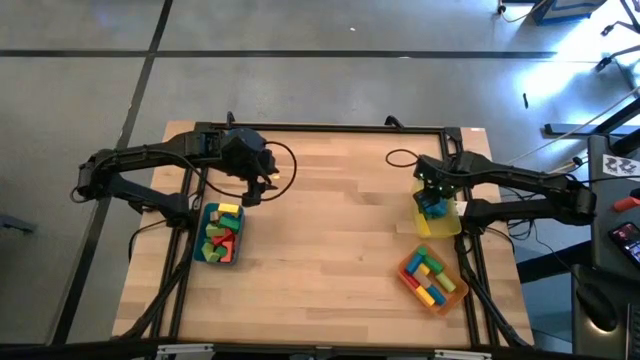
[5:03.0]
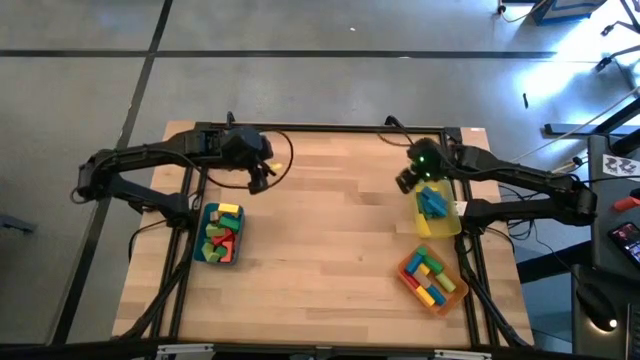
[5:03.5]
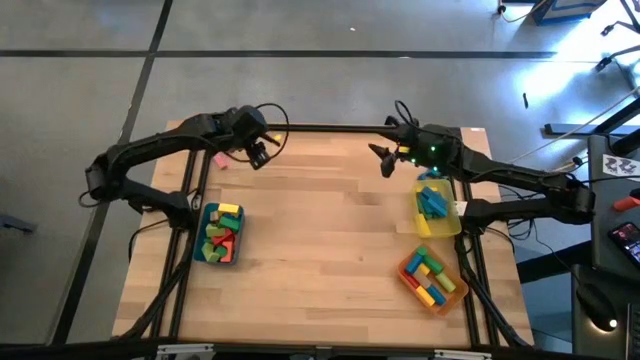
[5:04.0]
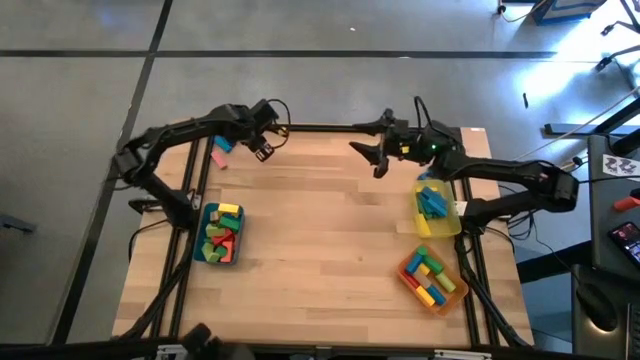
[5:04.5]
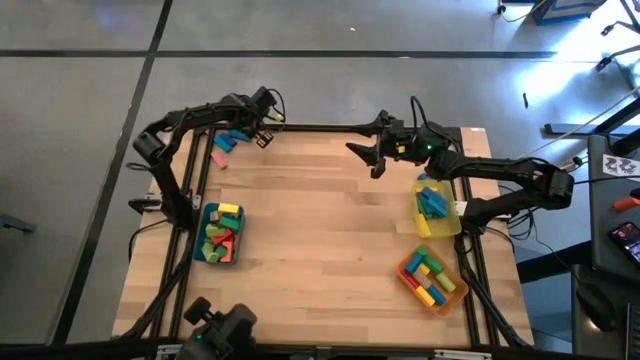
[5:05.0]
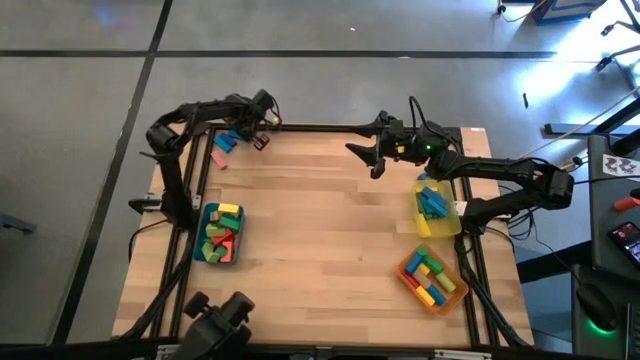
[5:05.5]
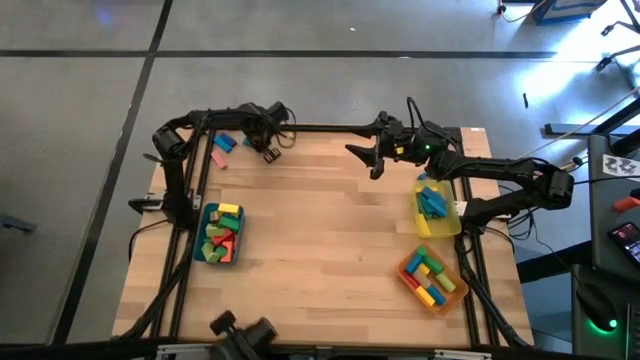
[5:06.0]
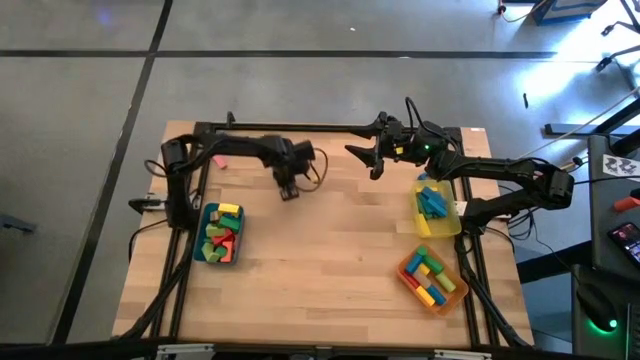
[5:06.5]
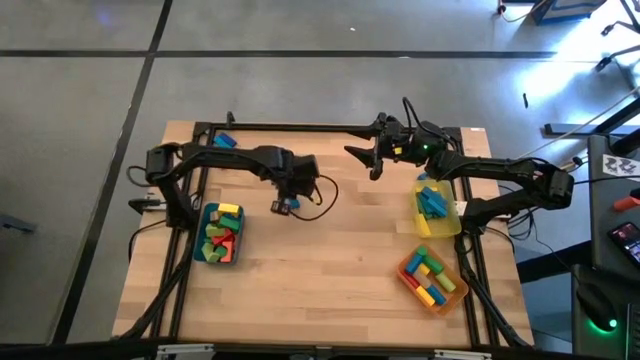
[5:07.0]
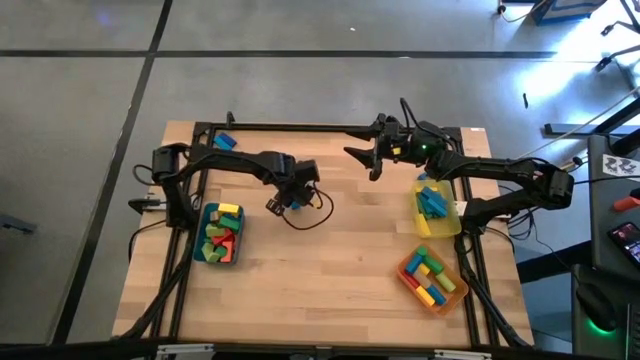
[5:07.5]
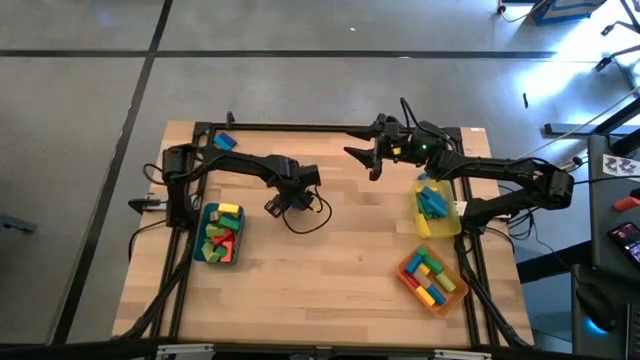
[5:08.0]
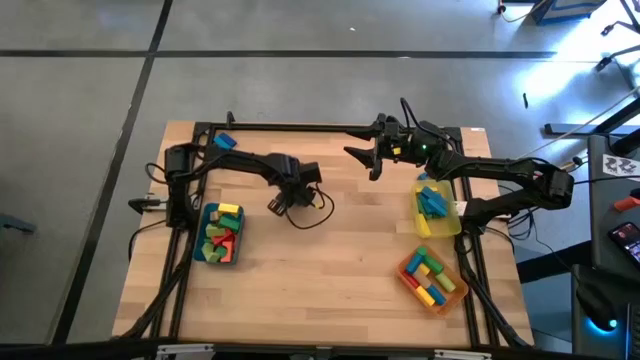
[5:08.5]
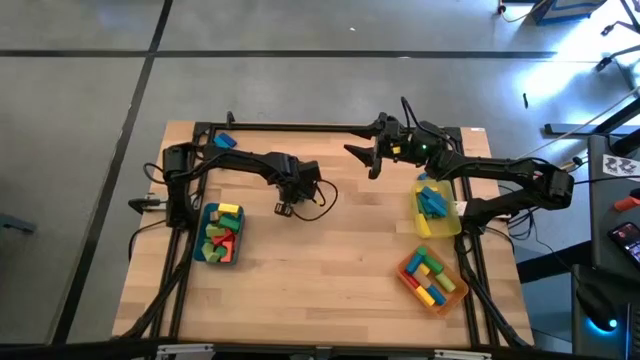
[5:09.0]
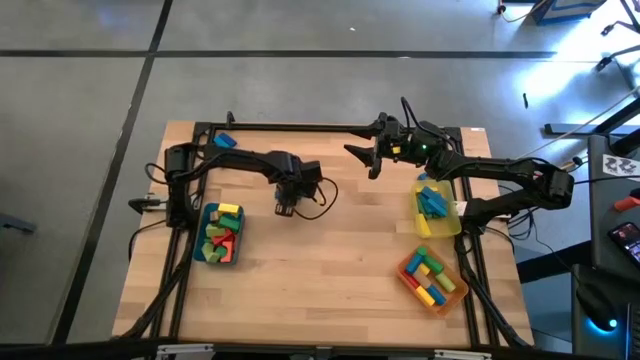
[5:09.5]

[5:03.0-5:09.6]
Task: Sort blocks by size
Put the blue rectangular block into the yellow bin

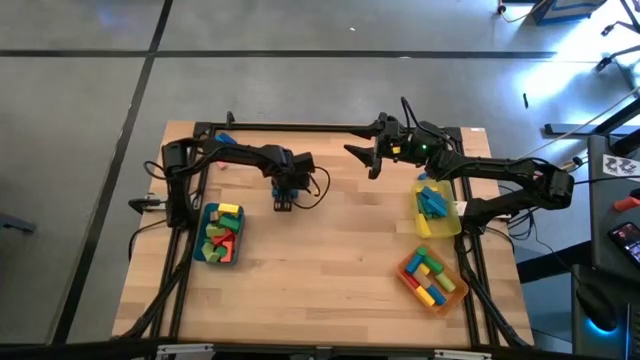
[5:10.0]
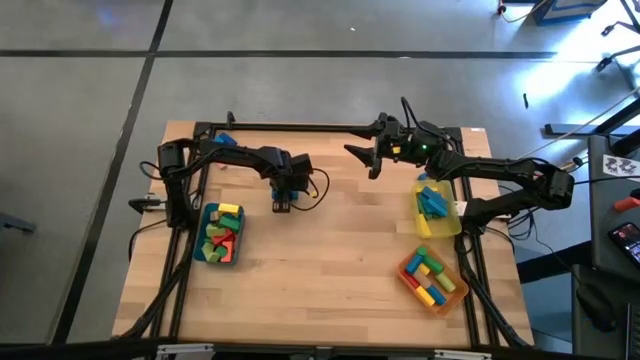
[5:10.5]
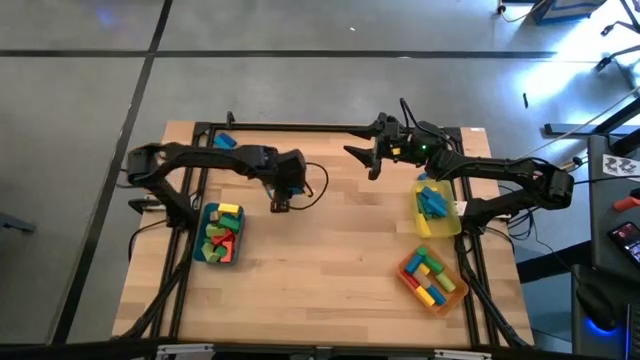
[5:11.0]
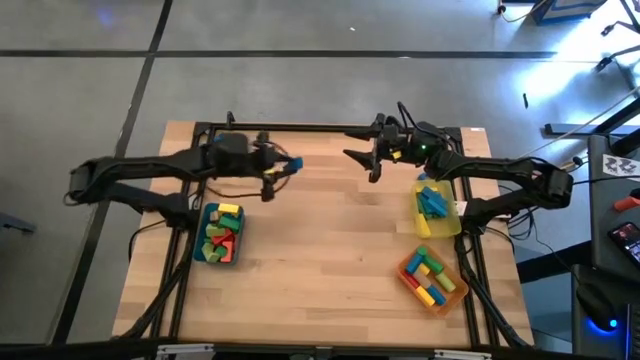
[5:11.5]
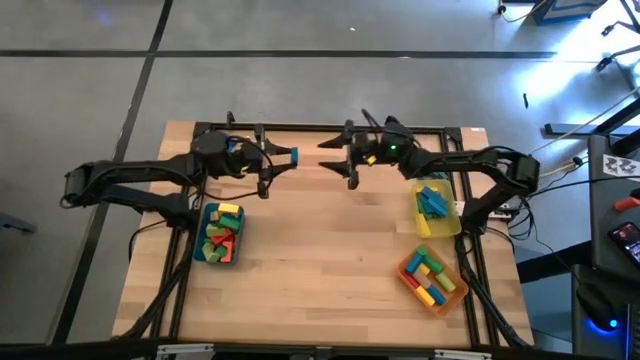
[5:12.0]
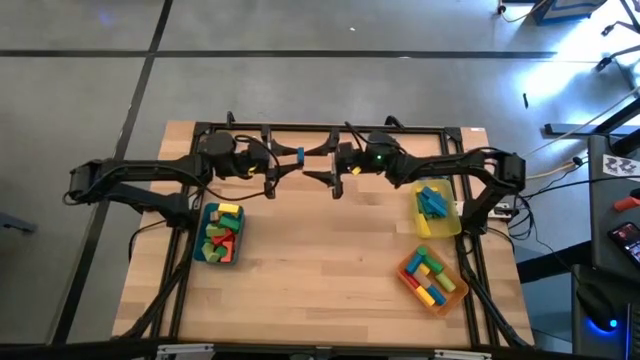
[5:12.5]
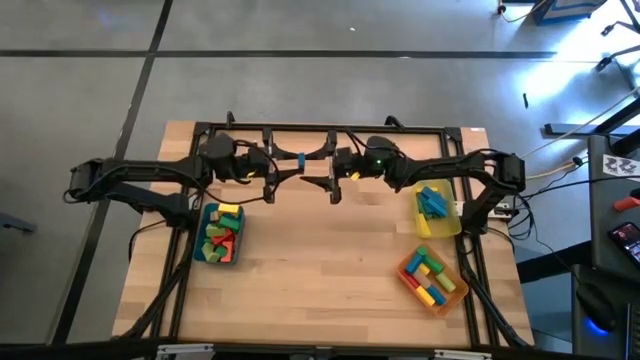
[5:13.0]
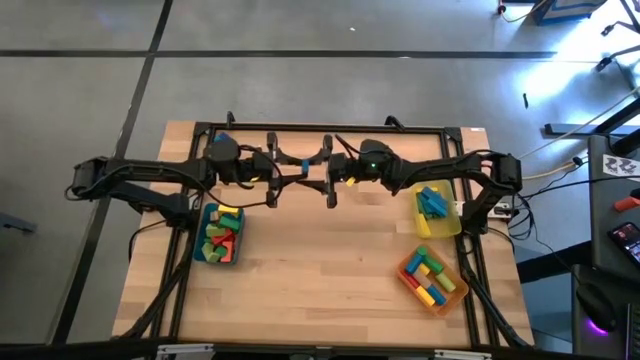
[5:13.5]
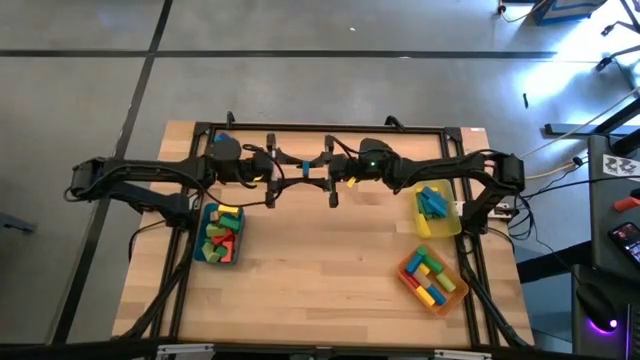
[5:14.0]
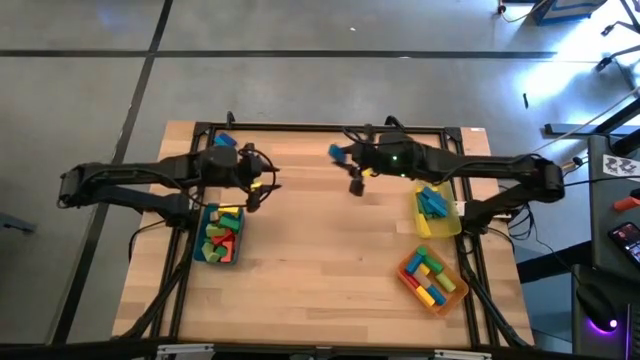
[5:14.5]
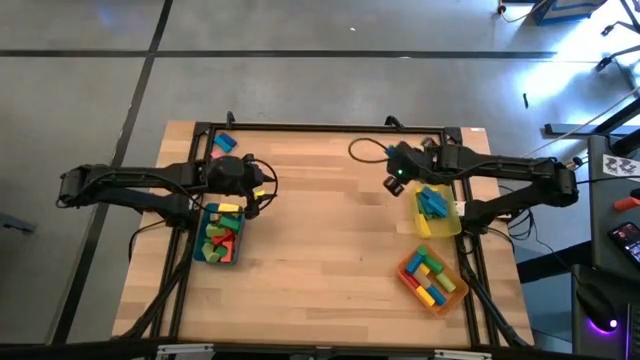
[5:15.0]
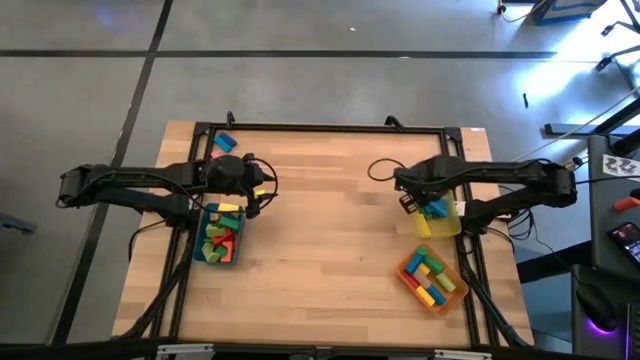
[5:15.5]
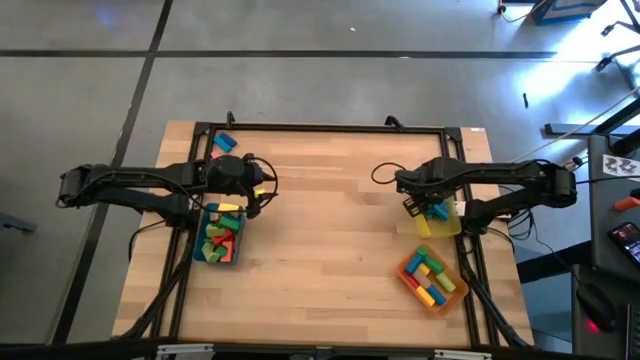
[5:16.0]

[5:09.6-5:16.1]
Put the blue rectangular block into the yellow bin

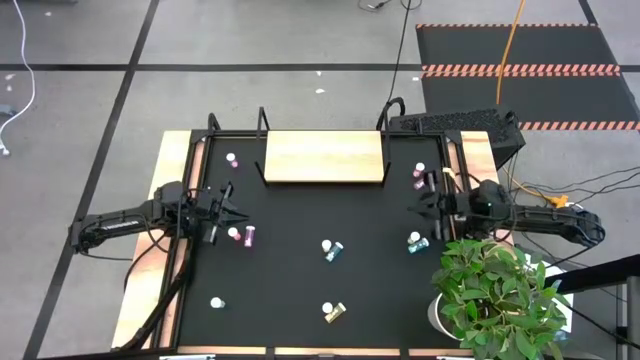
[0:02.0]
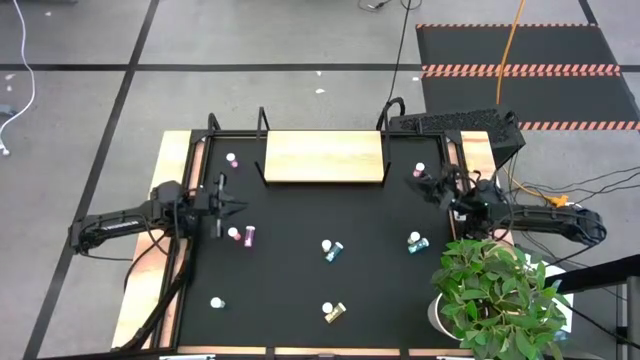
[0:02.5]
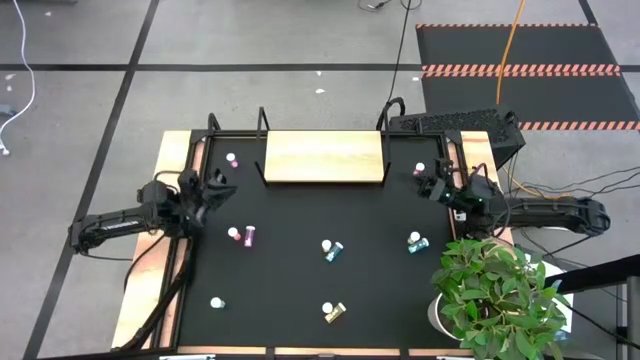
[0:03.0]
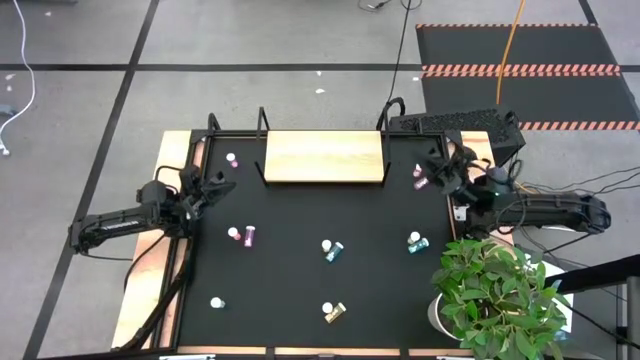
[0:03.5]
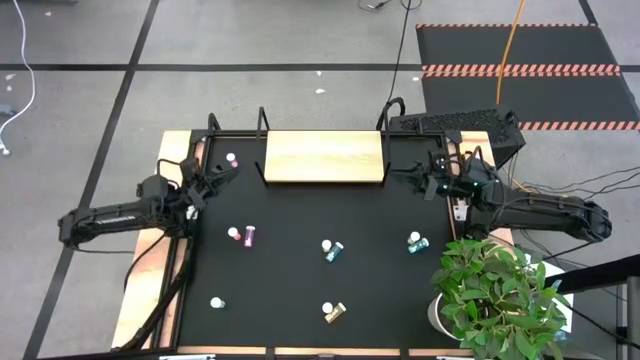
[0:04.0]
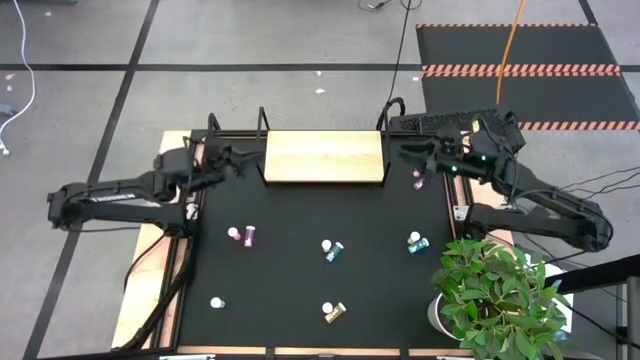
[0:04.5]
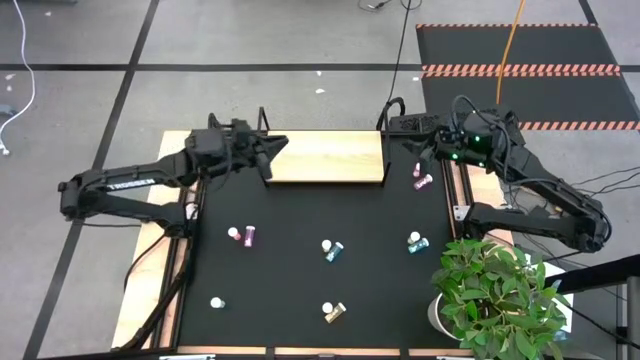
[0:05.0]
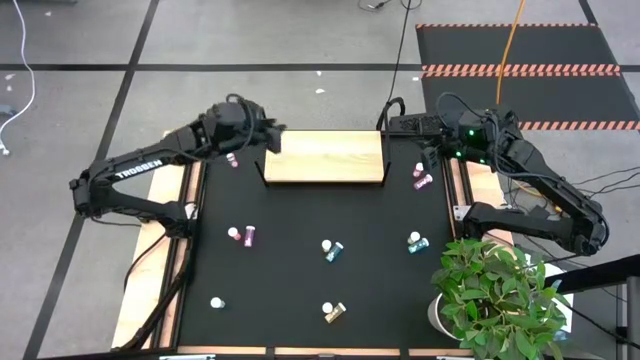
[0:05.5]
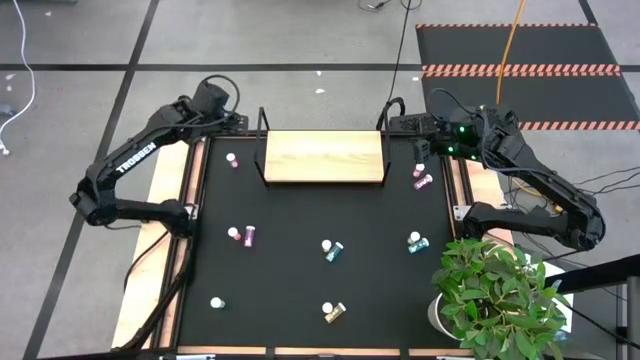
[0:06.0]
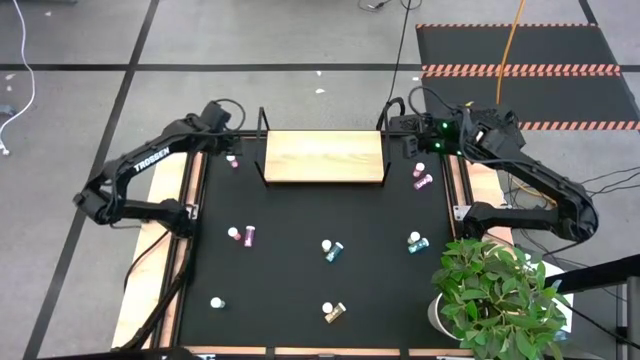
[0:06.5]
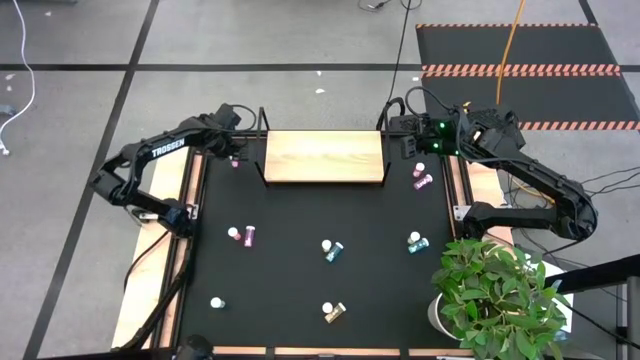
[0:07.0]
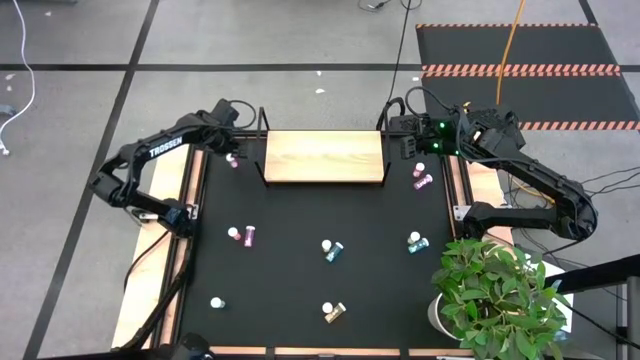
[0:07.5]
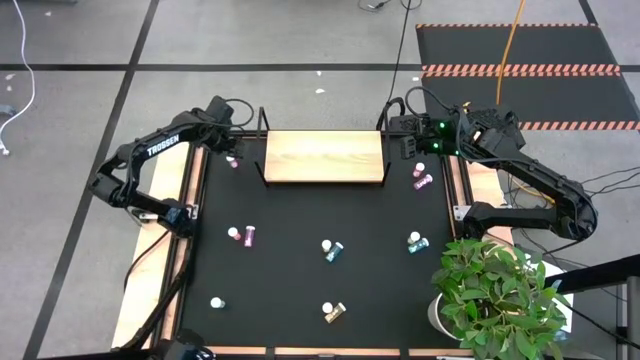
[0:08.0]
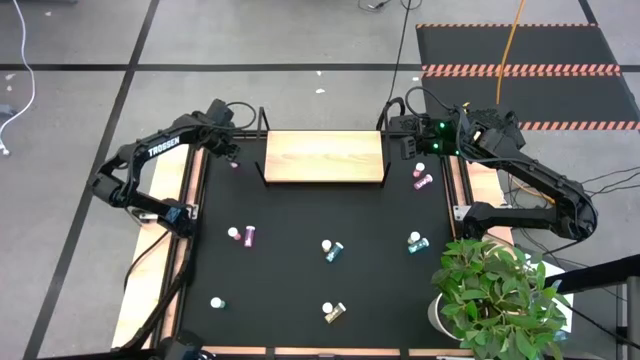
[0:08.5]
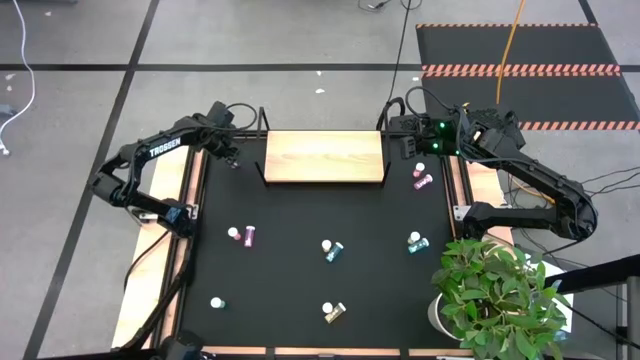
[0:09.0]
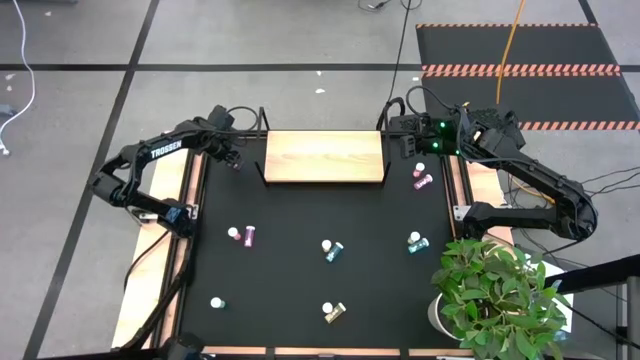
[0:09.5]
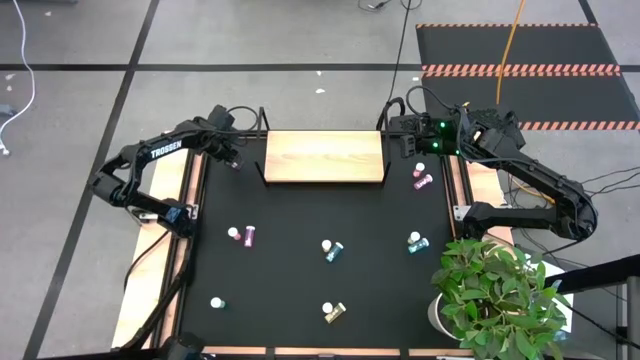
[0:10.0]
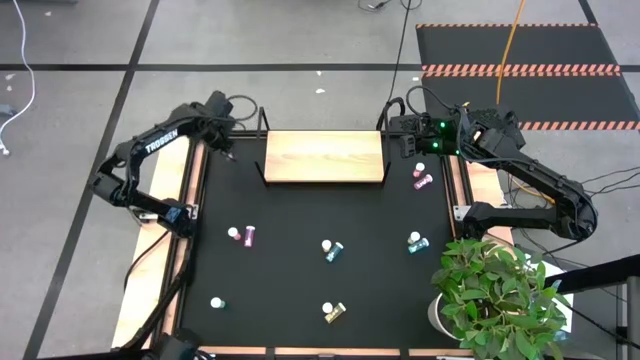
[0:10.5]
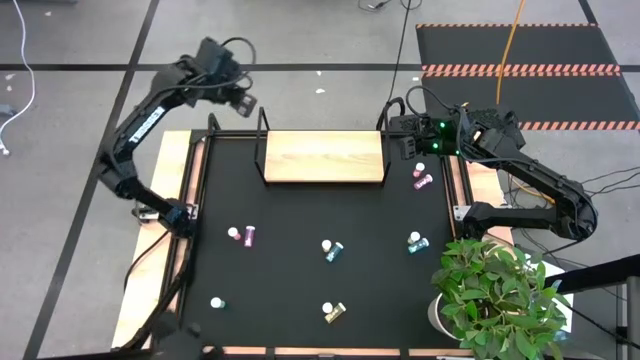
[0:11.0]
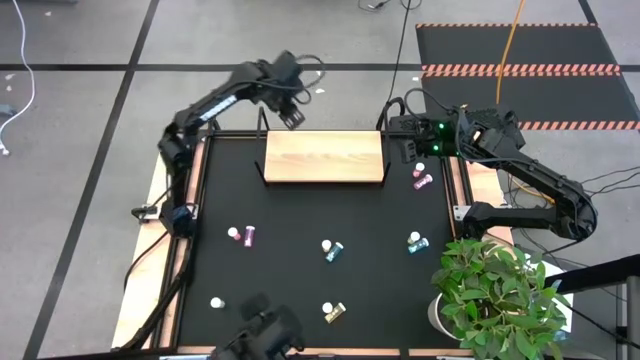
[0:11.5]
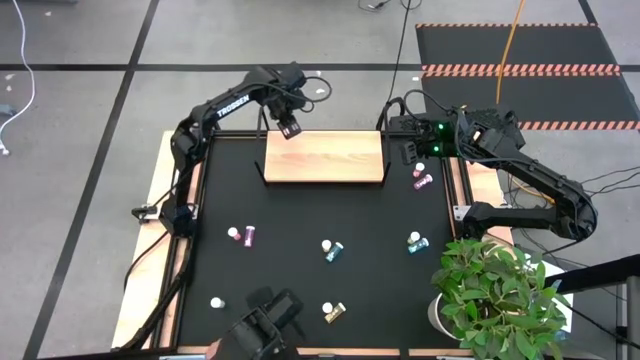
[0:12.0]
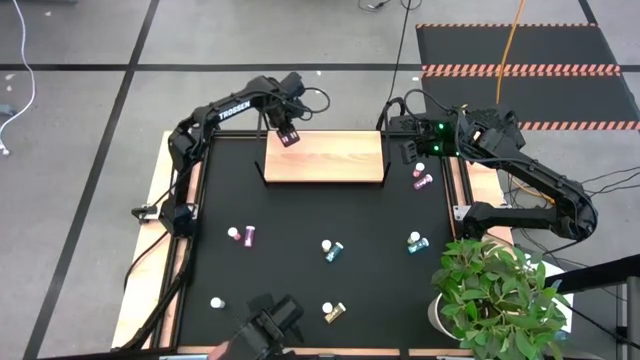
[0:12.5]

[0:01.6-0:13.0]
Task: Pick and place medicine bottles onto shelf by color
Put the top left pink pill bottle on the shelf
